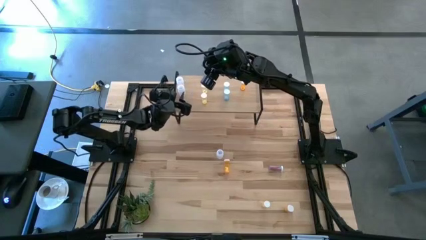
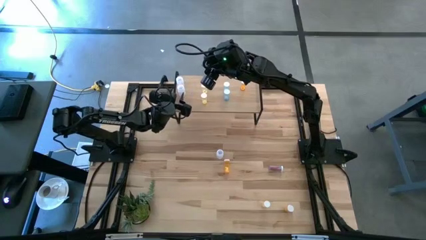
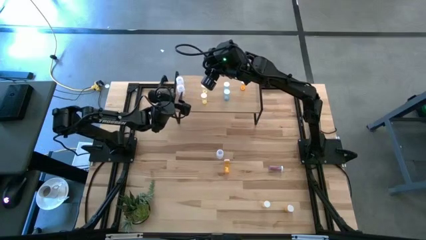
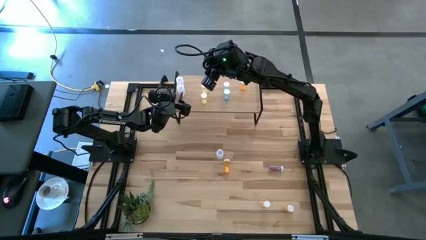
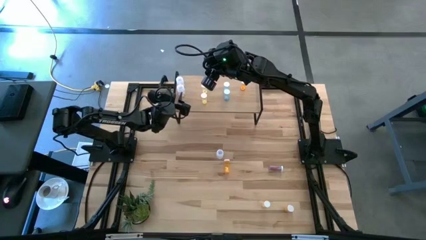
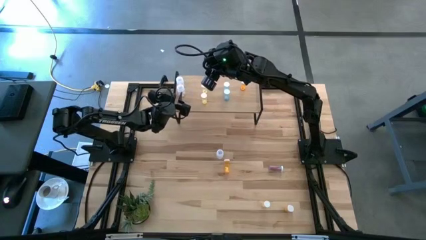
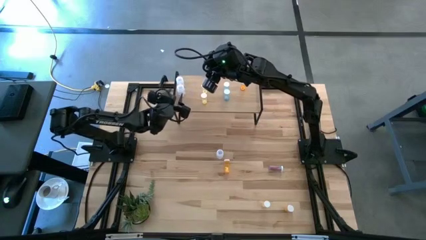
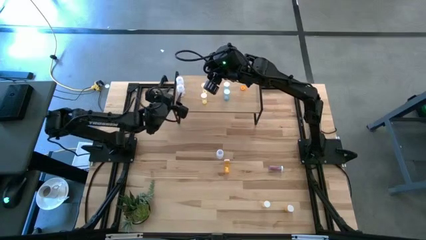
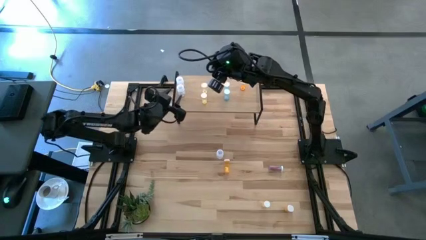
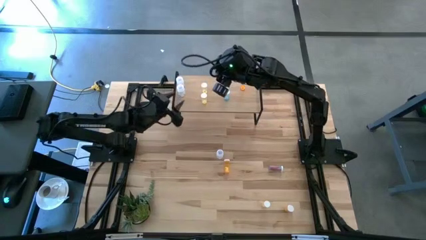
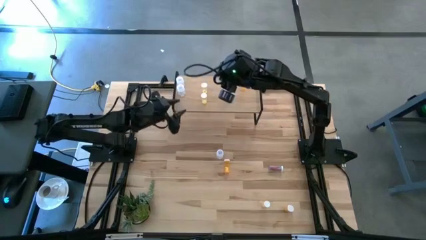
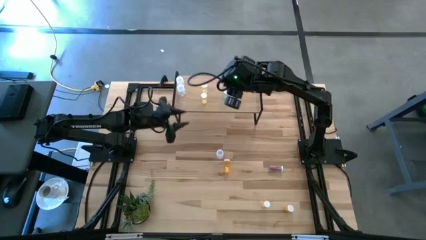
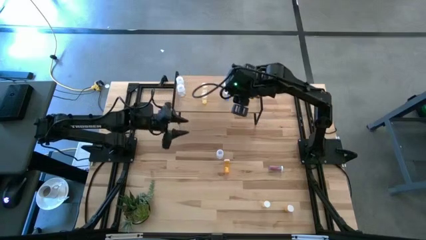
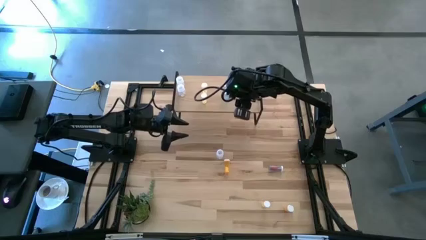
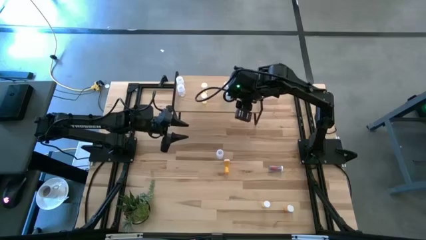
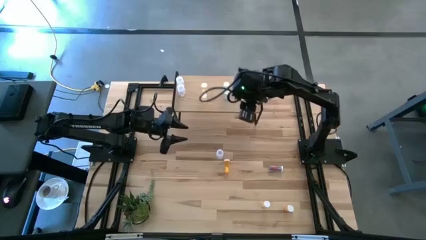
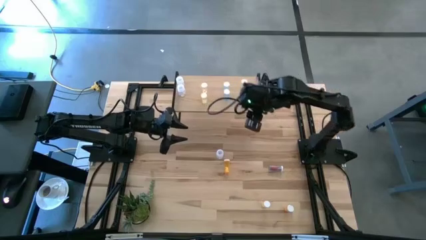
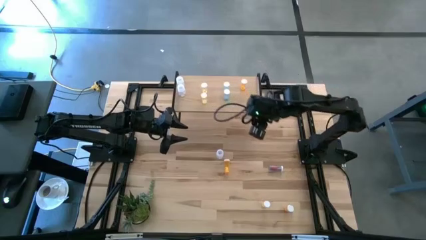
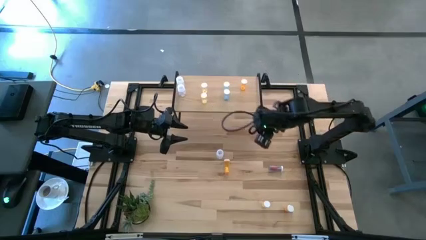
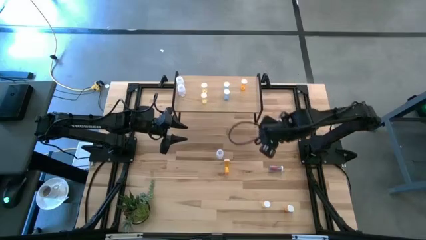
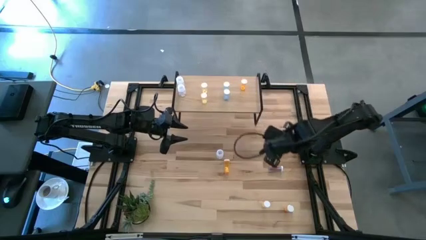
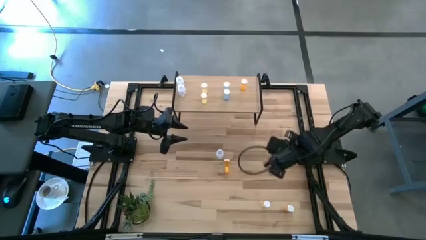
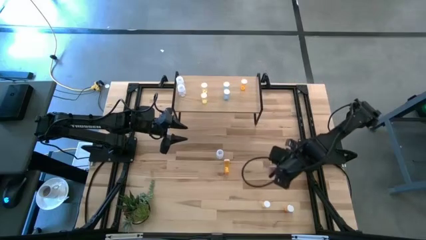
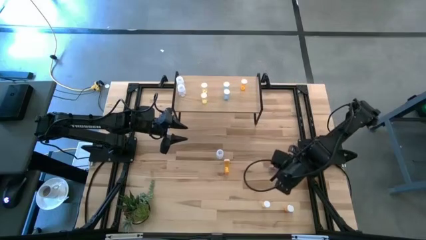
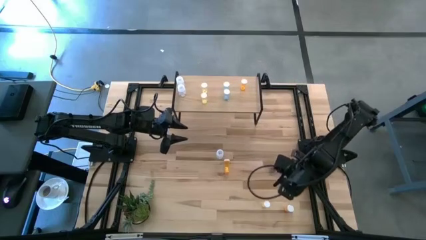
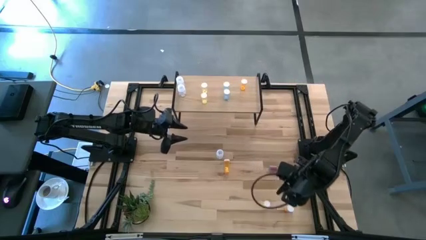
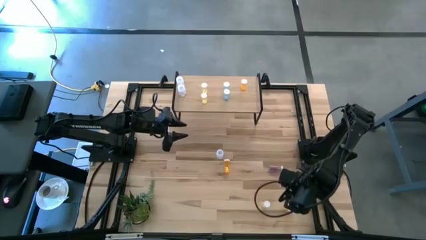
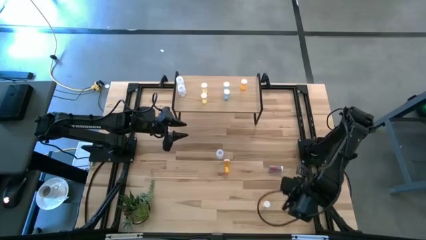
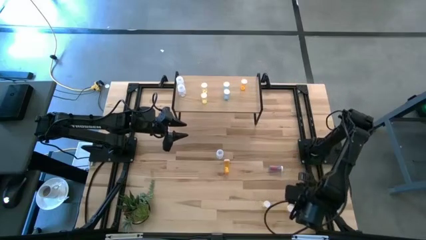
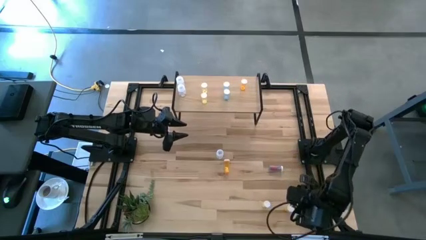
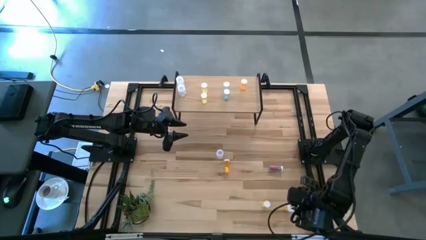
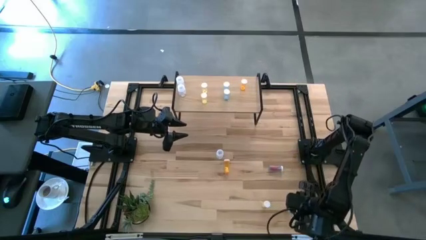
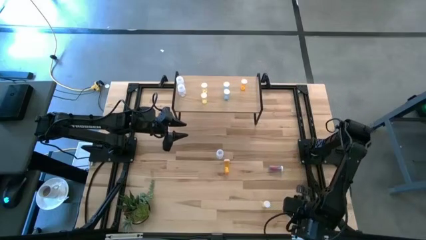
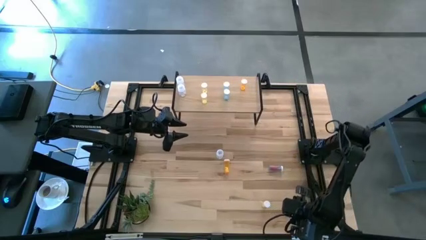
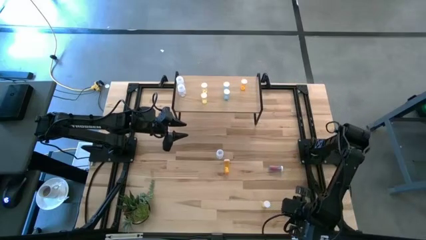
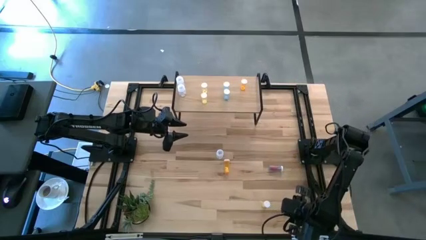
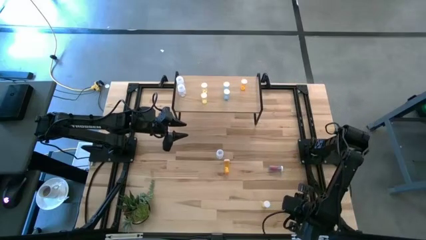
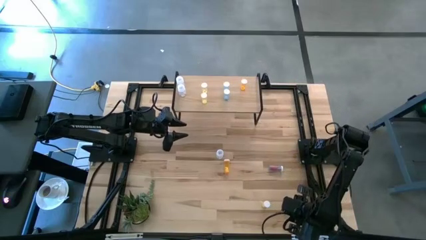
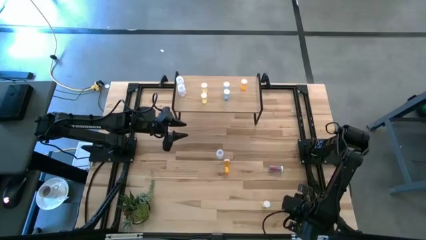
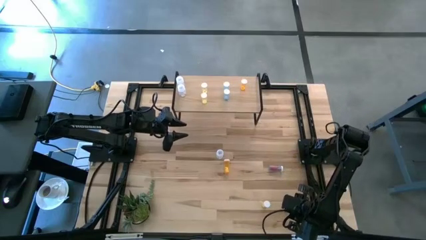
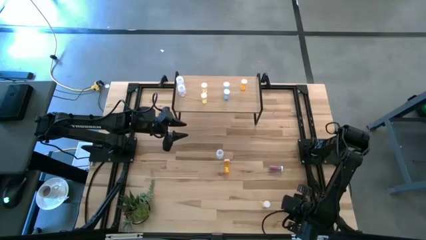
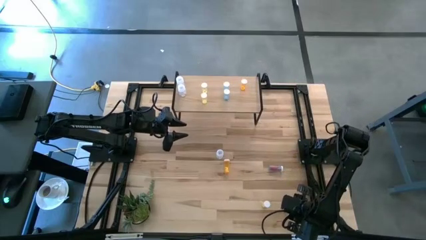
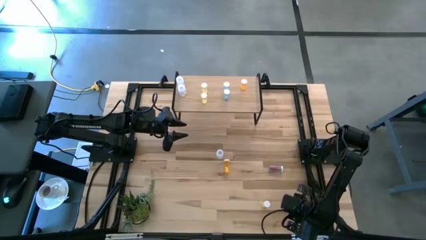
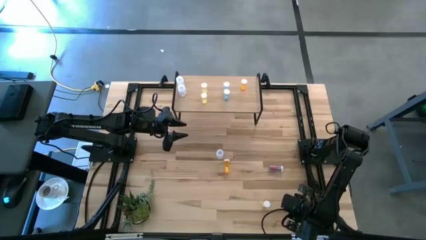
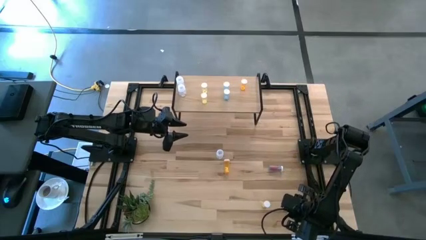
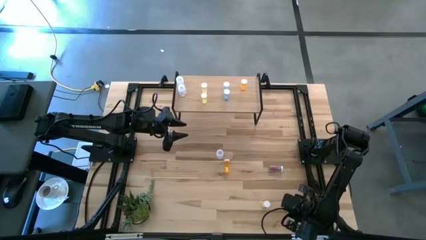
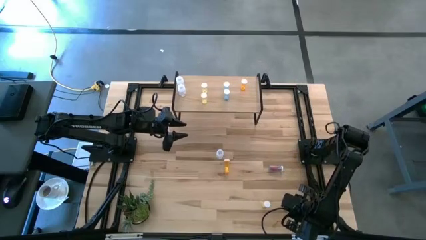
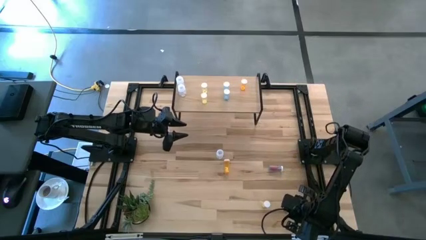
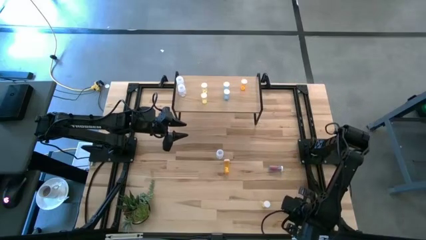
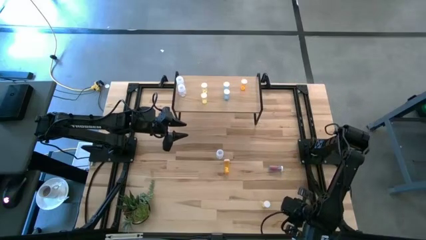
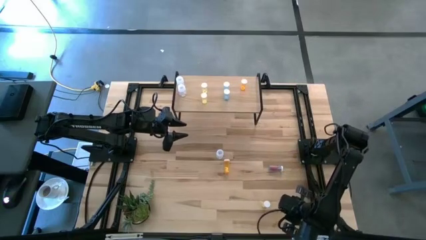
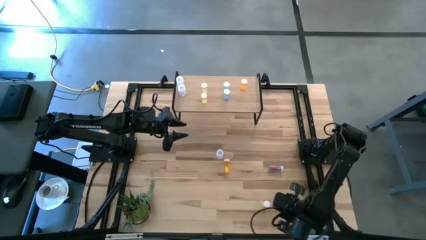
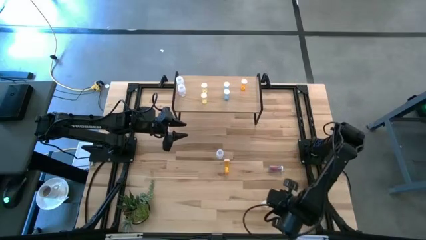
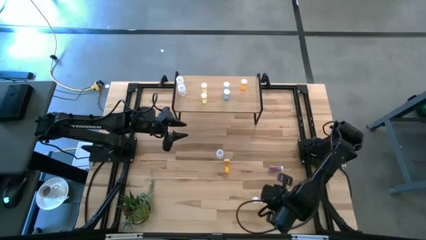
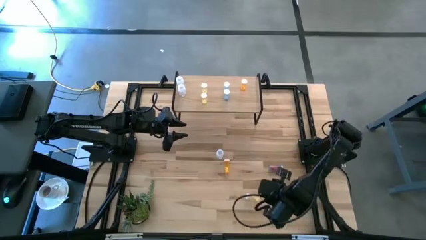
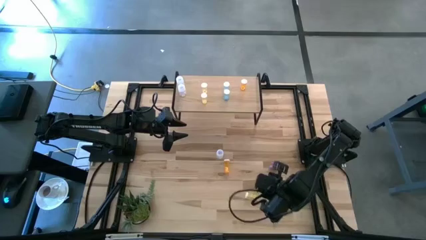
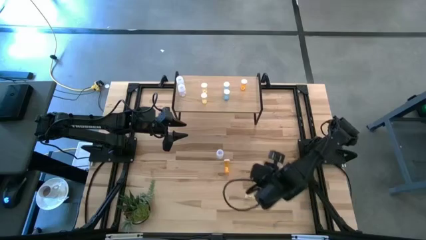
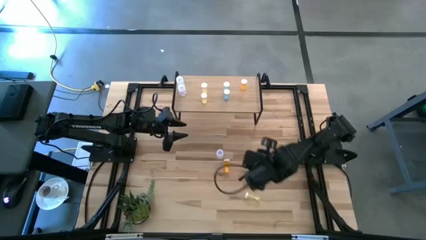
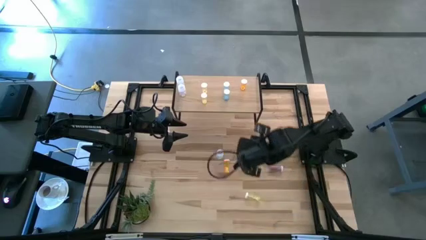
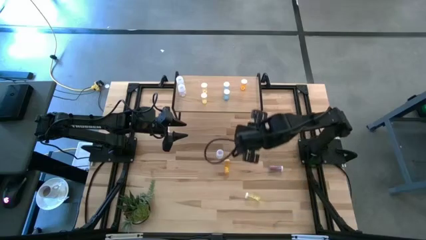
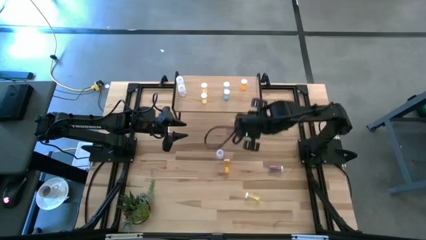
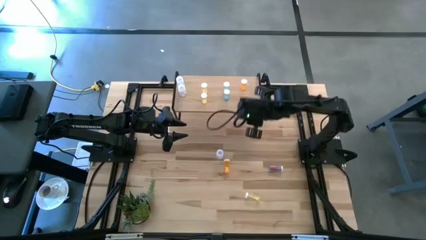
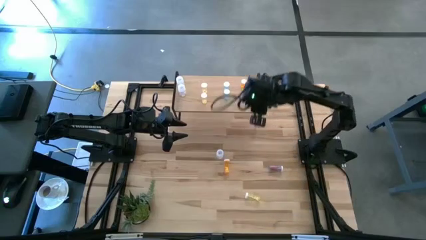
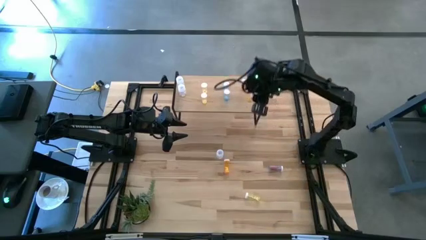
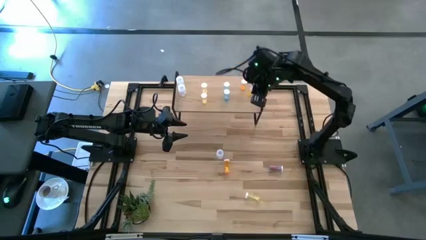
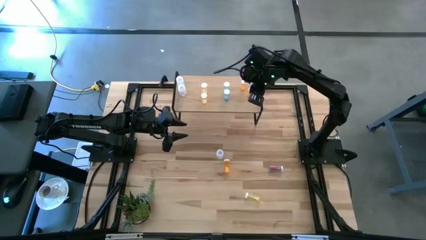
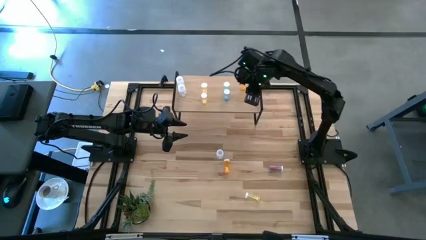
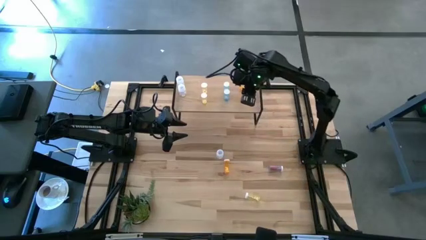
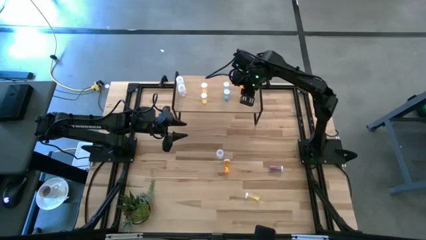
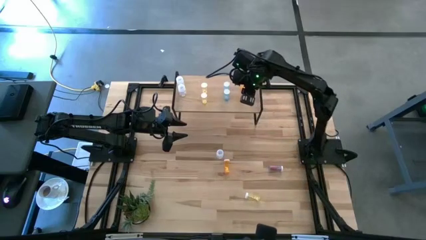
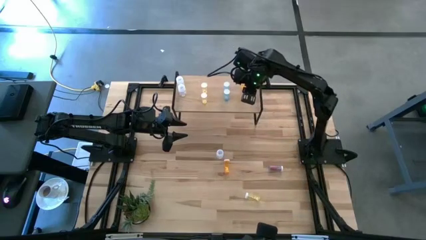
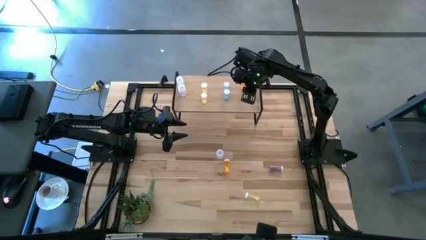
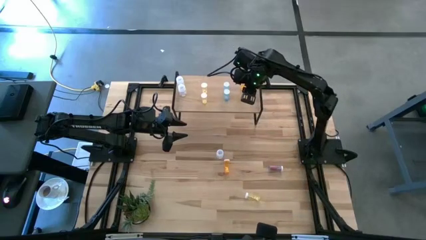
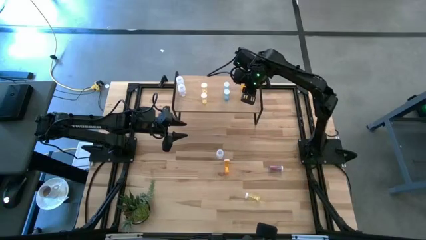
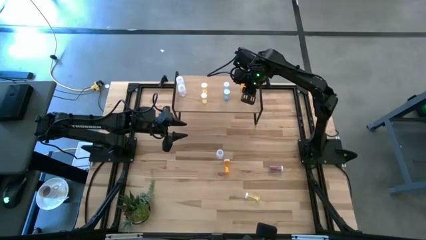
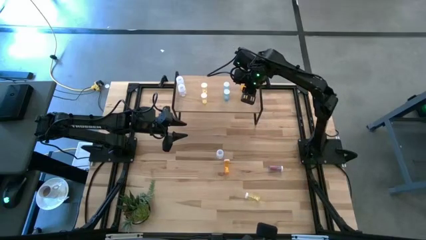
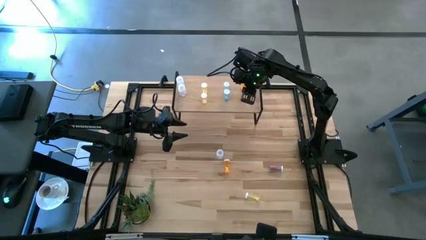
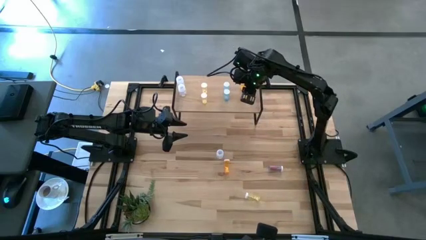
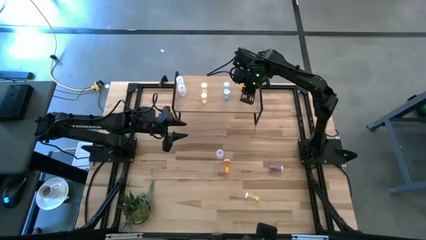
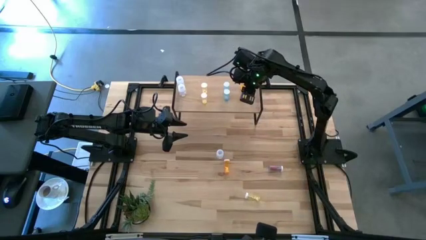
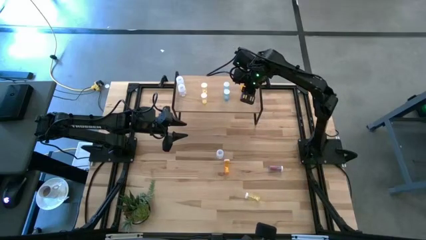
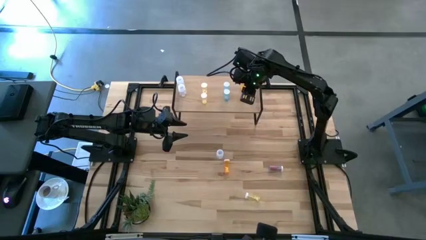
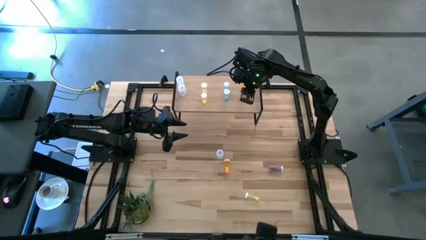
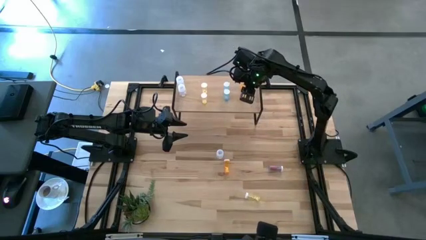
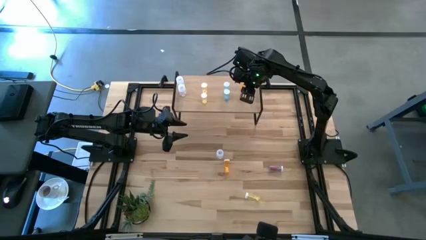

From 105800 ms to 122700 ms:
Task: Pick and place medicine bottles onto shelf by color
Put the bottom orange pill bottle on the shelf aligned with the other orange pill bottle
